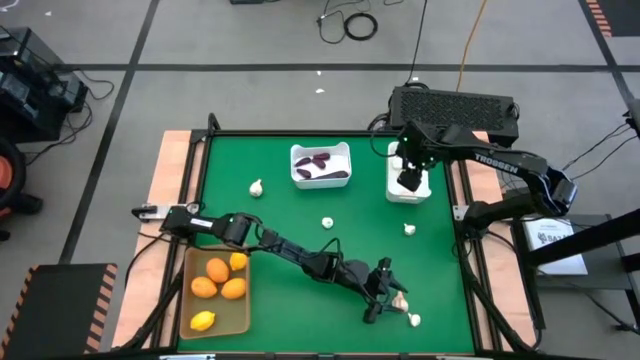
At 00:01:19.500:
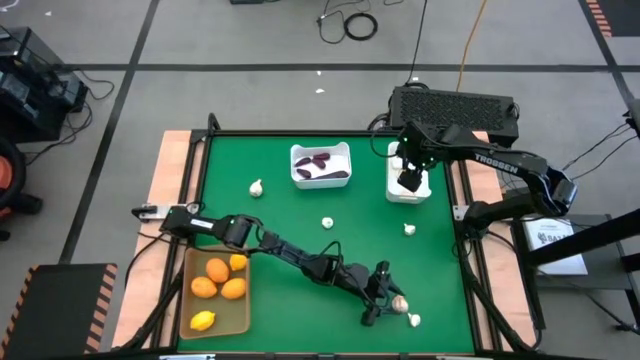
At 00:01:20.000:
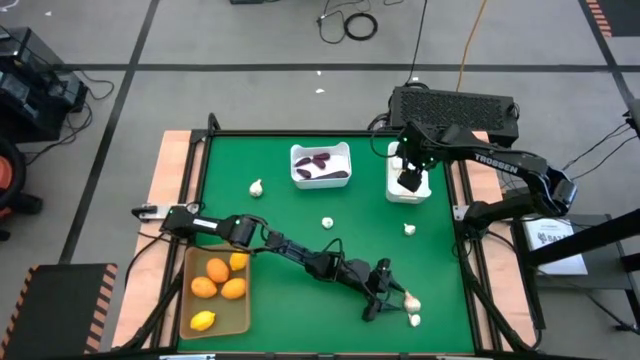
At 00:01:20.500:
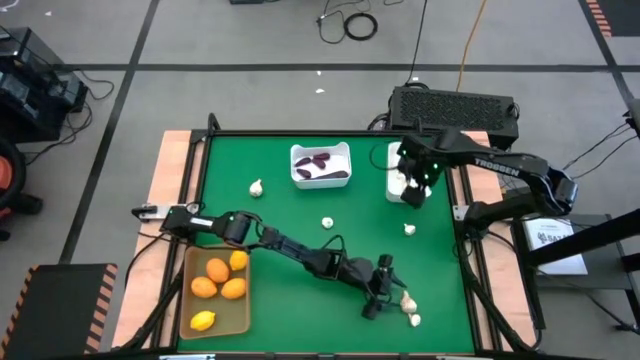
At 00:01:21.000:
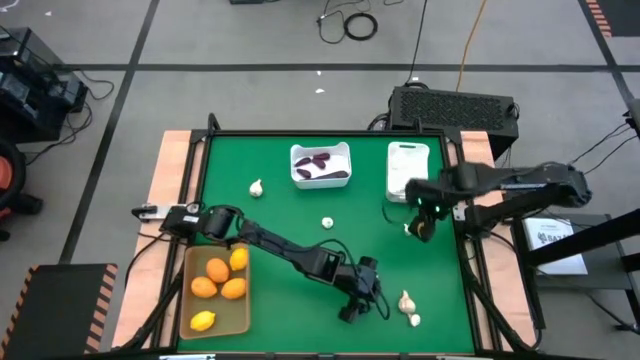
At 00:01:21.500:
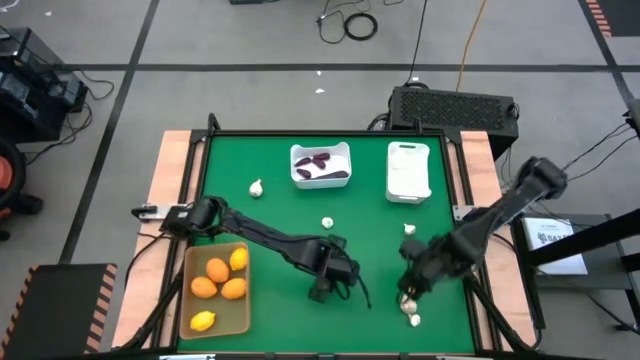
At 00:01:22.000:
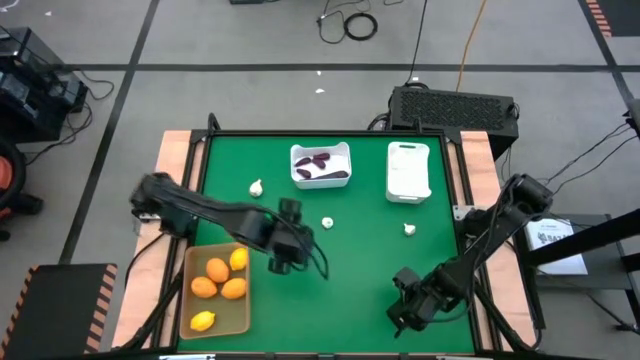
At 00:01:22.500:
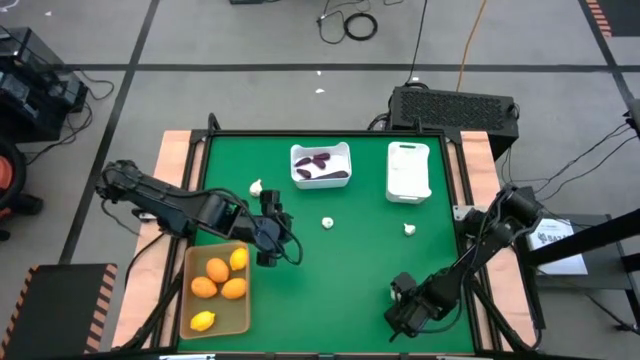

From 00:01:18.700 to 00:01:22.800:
Task: Sort produce into baskets
Put the white garlic into the right white bin

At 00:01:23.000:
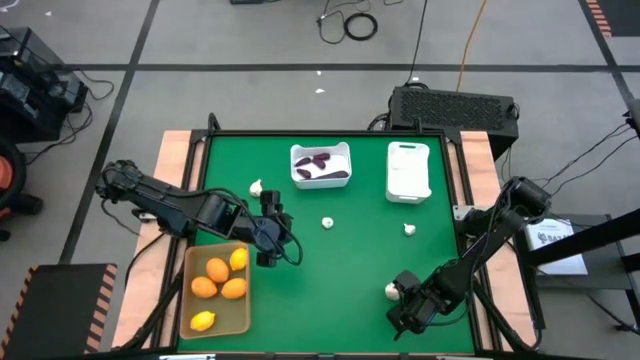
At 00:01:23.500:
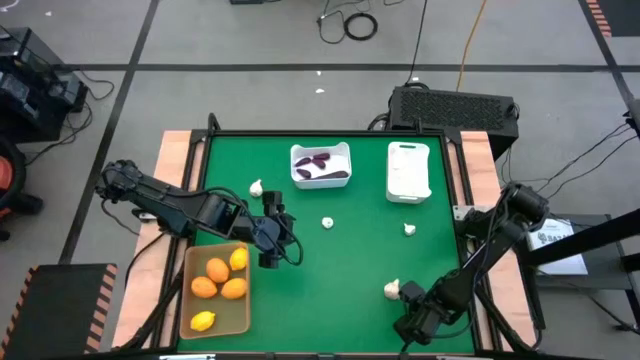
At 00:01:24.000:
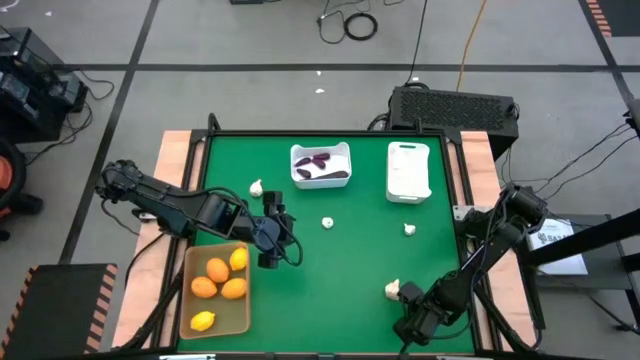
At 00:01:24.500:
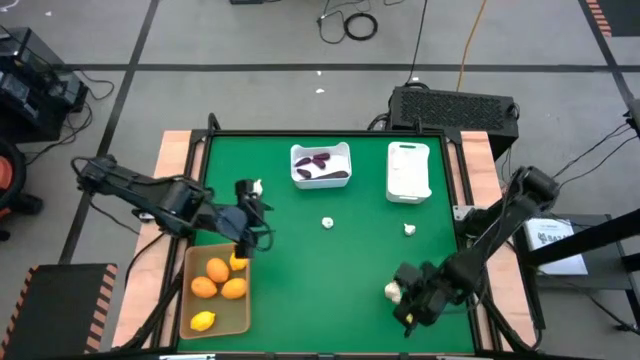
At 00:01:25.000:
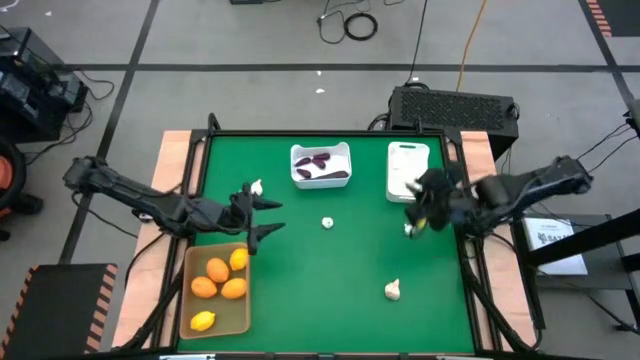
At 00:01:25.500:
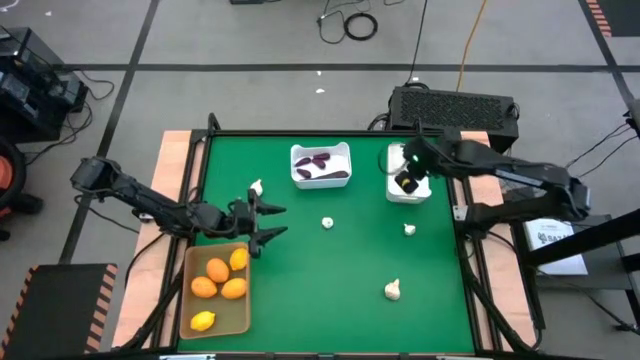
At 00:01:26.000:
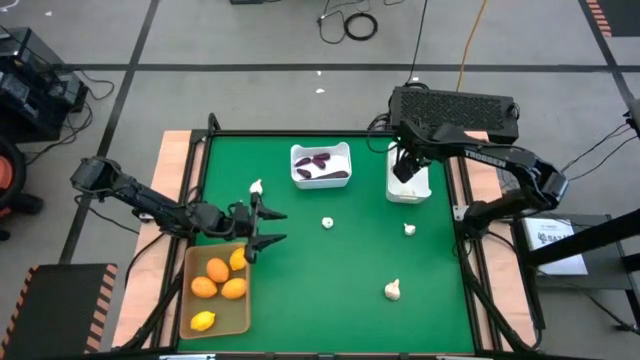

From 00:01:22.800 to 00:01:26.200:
Put the white garlic into the right white bin

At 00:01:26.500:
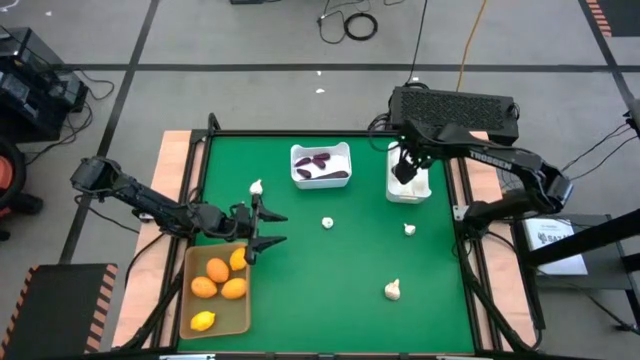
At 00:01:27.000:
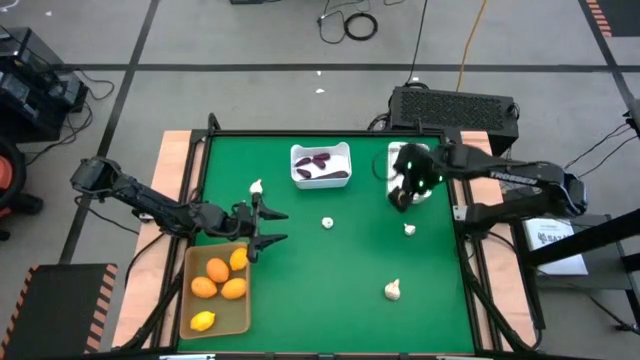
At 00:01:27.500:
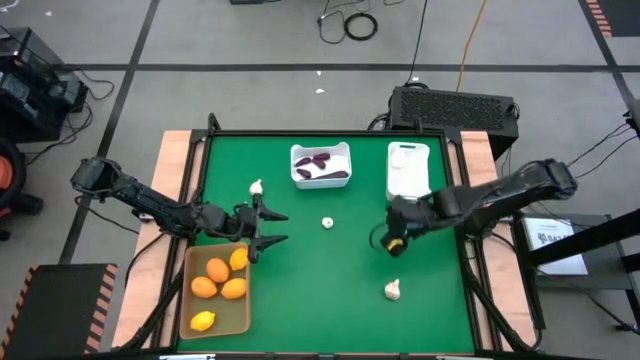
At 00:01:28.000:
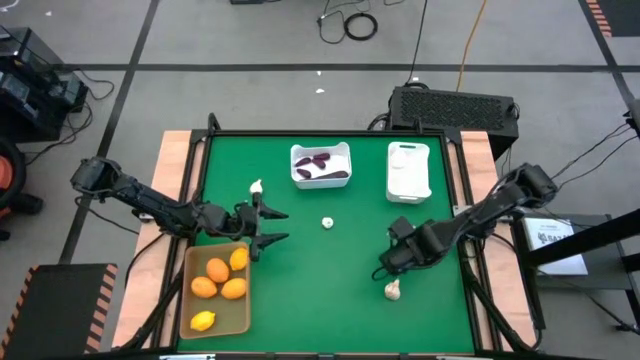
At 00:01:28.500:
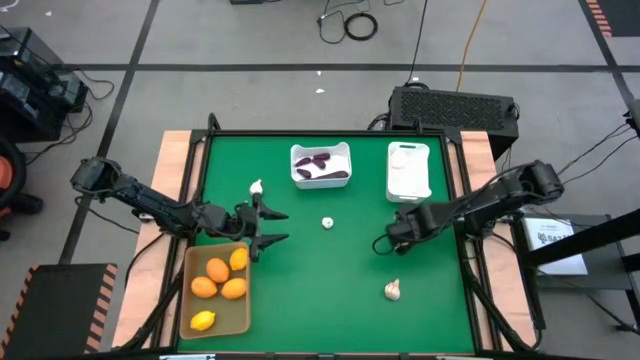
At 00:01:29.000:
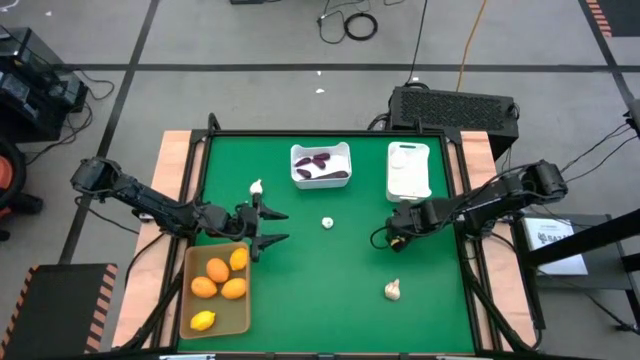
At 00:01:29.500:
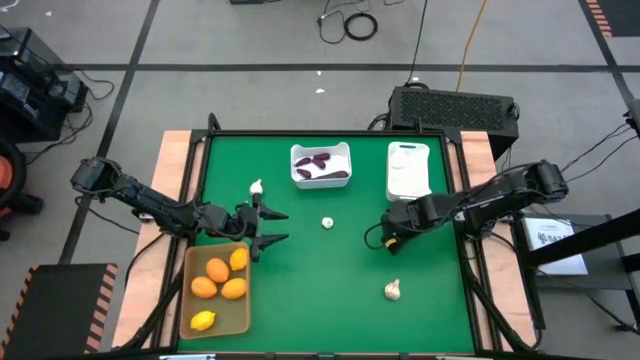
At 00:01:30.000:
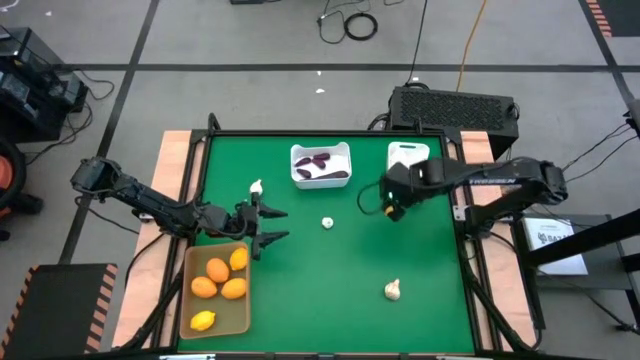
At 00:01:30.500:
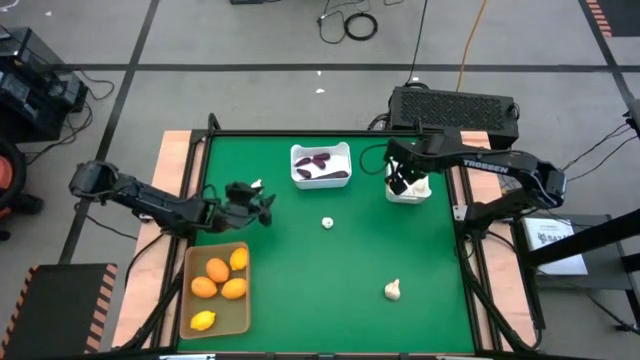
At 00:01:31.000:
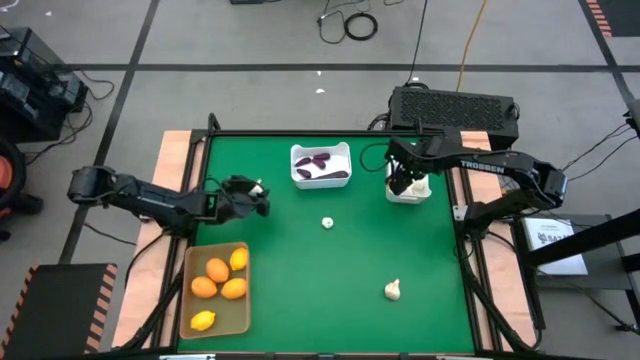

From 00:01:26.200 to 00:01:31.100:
Put the middle right white garlic into the right white bin

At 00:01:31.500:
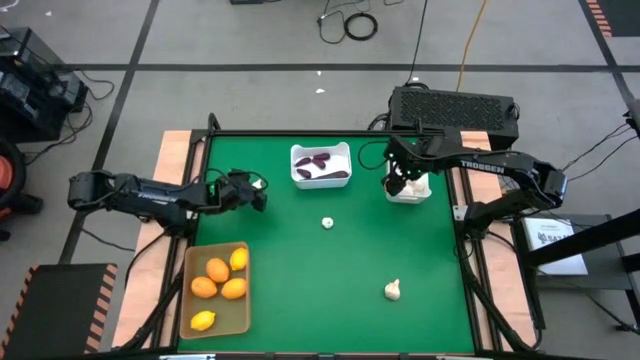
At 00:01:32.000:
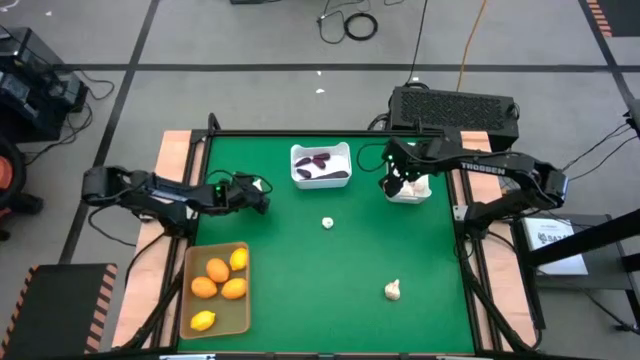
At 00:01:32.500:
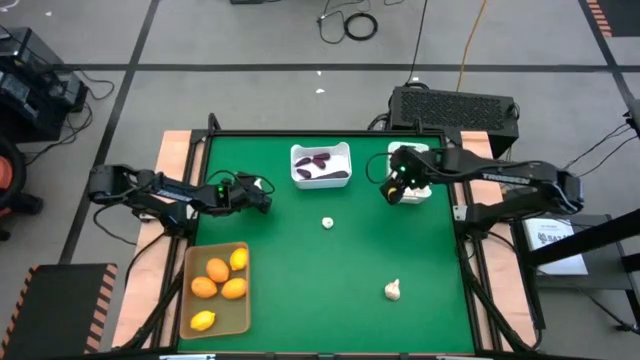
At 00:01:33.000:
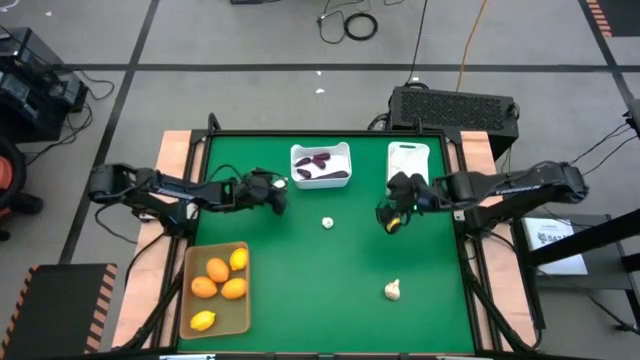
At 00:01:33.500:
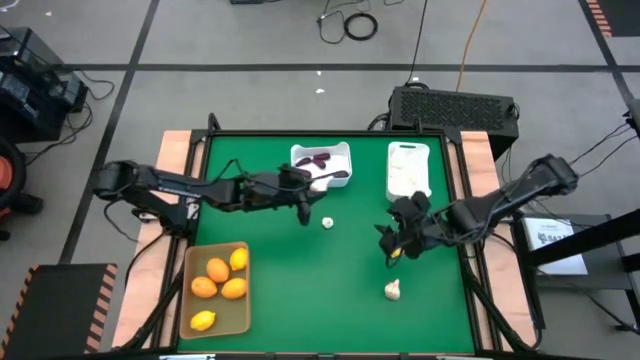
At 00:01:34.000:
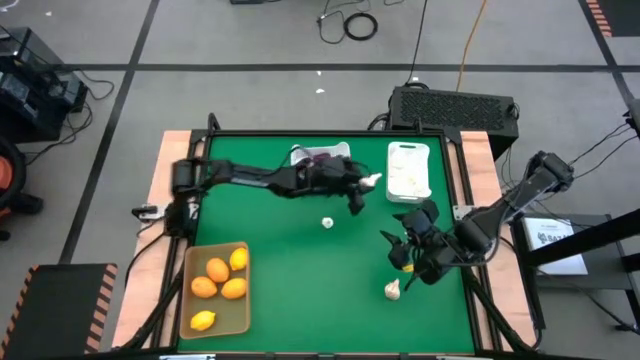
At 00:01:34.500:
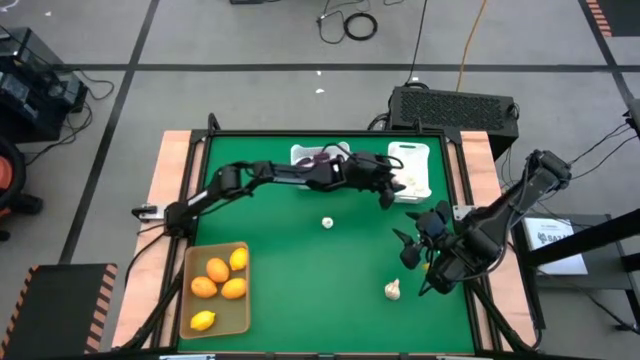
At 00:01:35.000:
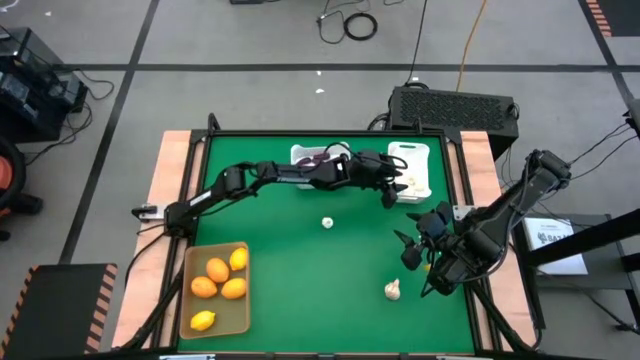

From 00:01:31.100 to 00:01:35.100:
Put the white garlic into the right white bin

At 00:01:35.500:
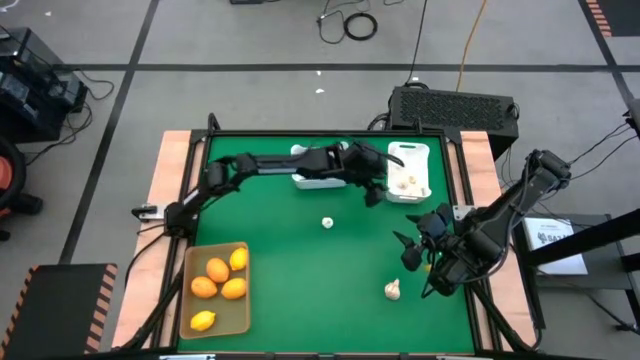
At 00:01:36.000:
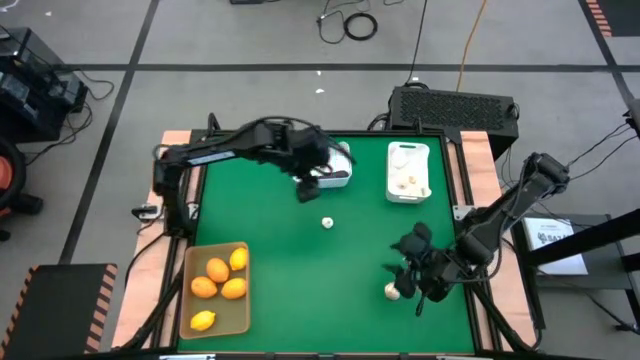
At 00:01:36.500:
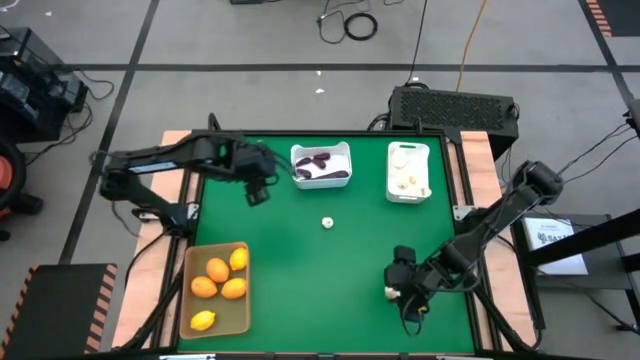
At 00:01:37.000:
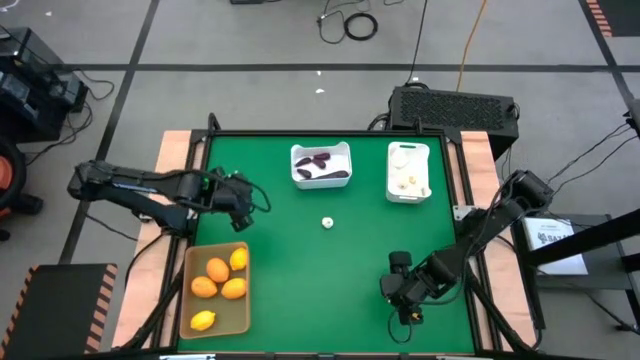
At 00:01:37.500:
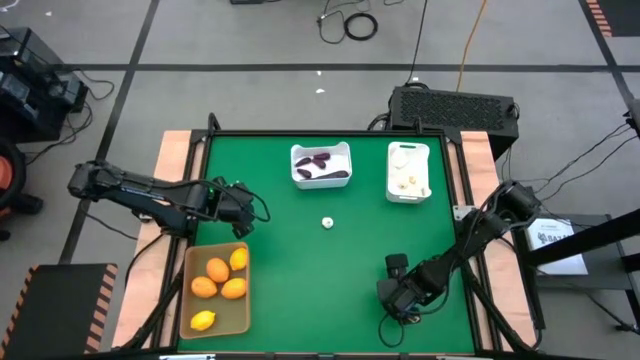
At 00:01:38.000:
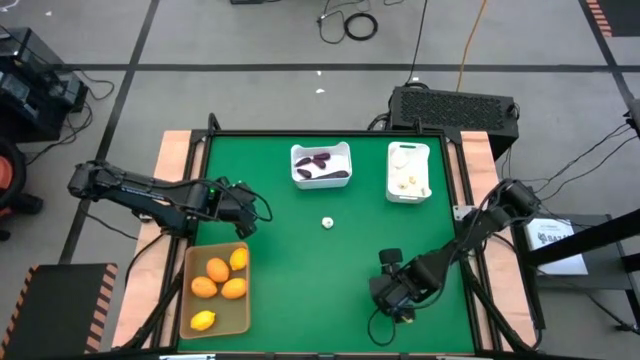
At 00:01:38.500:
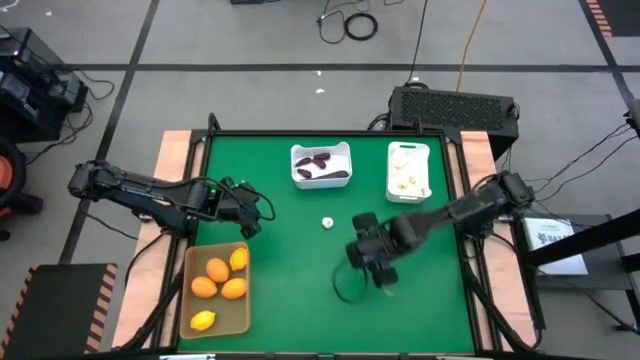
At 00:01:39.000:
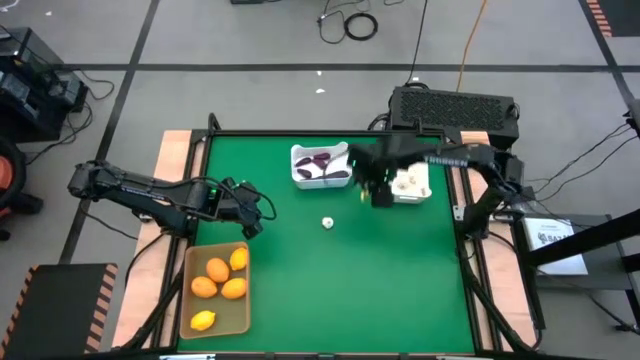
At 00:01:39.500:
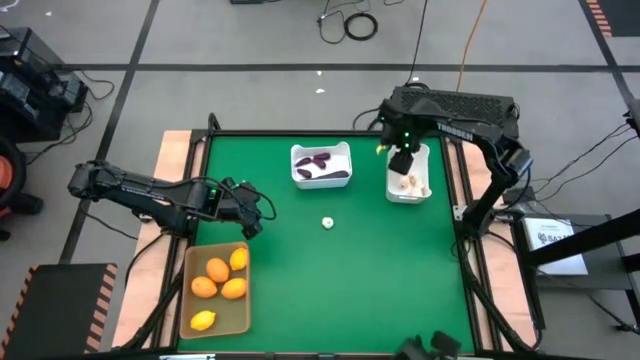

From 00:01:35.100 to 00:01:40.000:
Put the white garlic into the right white bin
